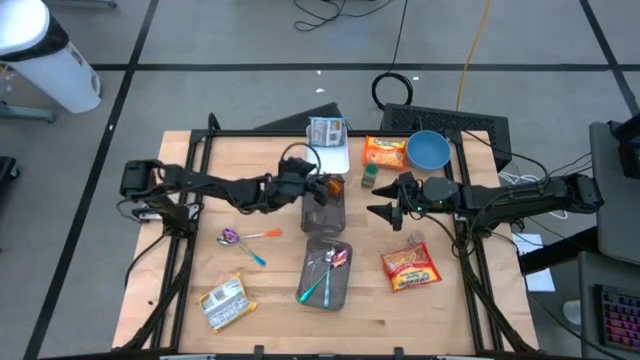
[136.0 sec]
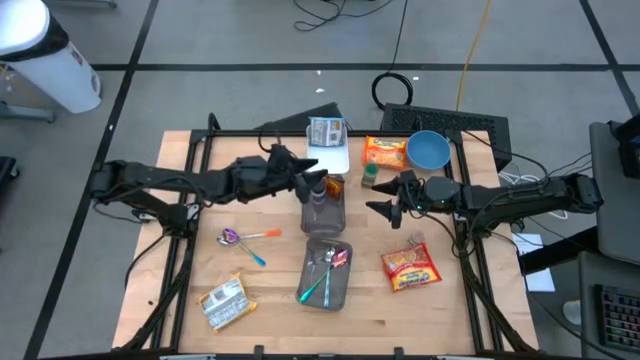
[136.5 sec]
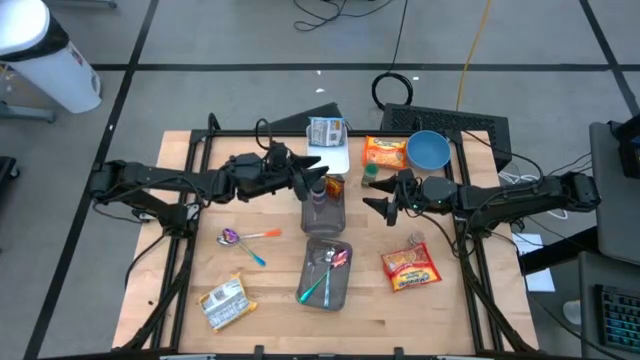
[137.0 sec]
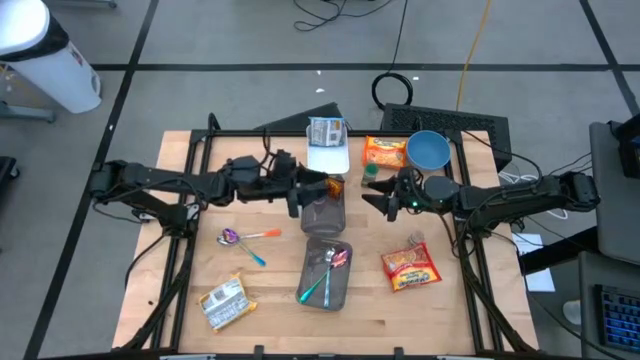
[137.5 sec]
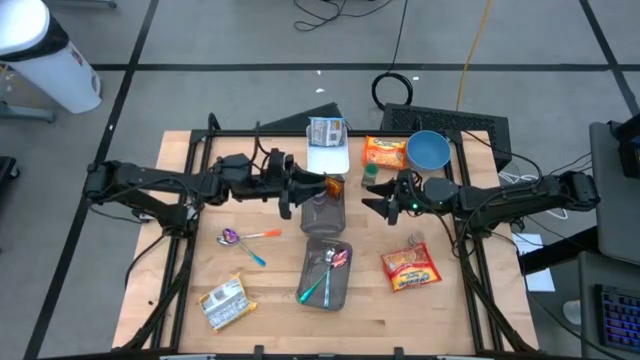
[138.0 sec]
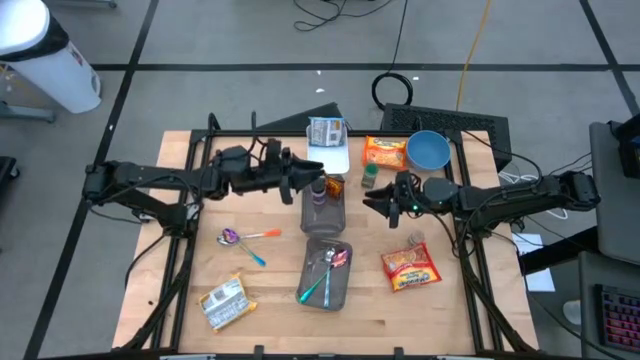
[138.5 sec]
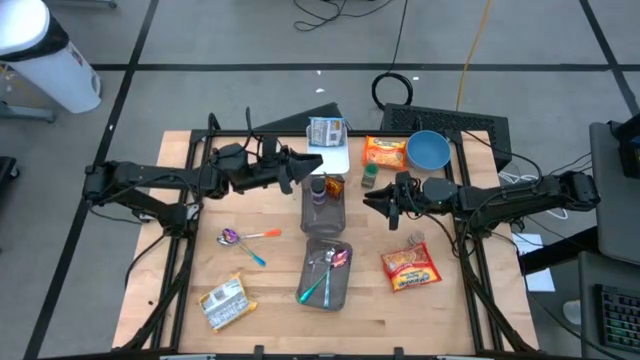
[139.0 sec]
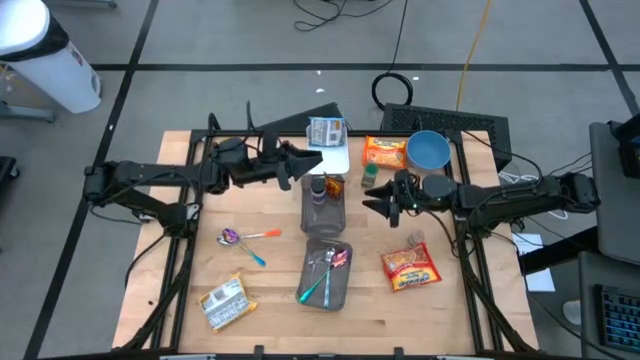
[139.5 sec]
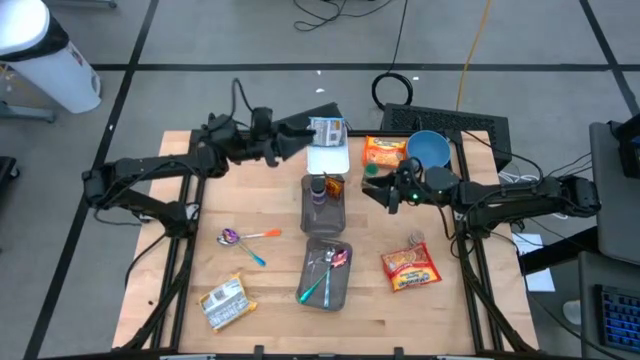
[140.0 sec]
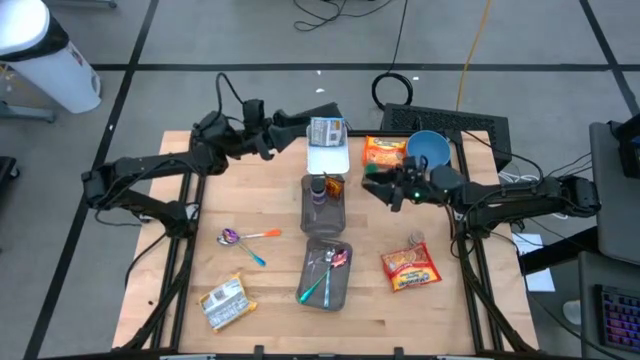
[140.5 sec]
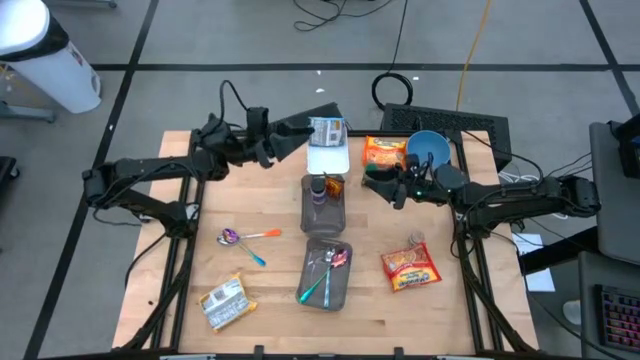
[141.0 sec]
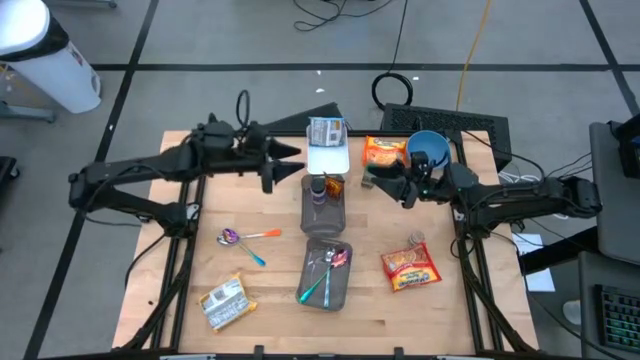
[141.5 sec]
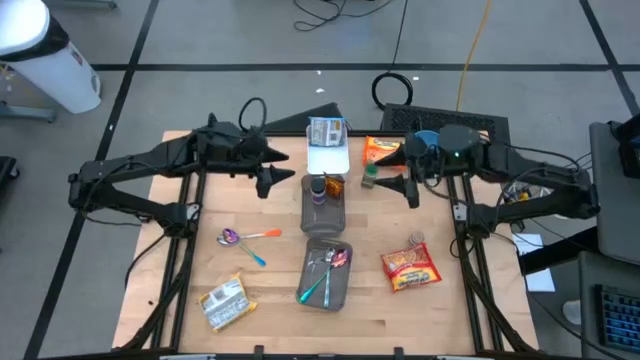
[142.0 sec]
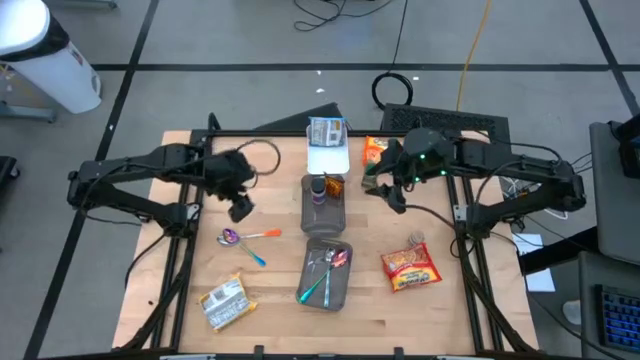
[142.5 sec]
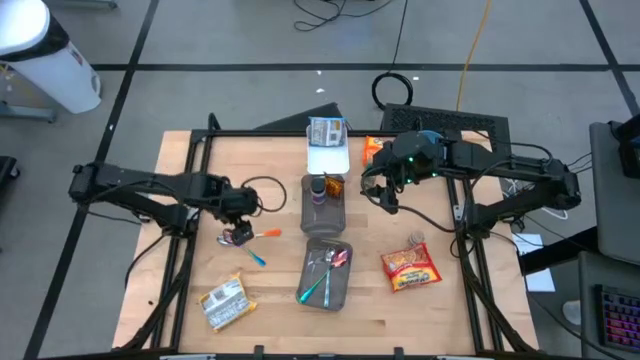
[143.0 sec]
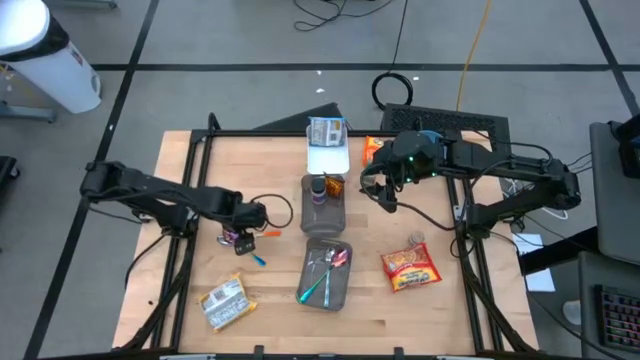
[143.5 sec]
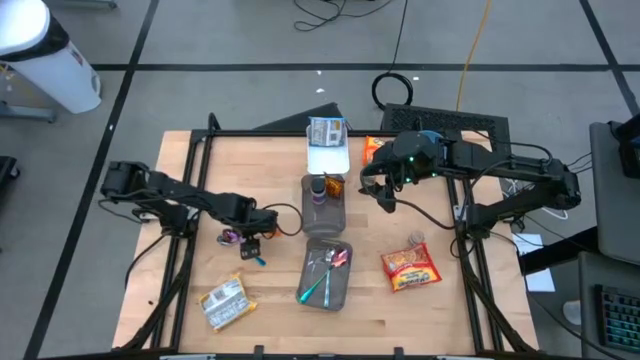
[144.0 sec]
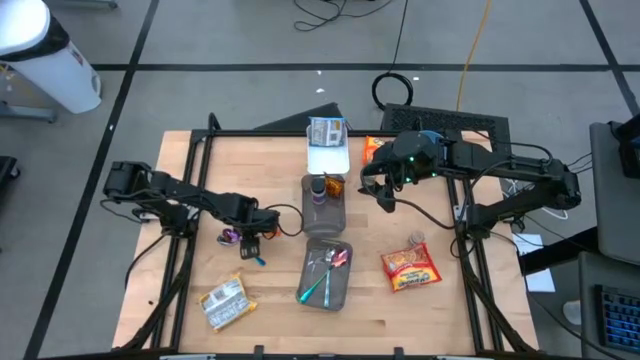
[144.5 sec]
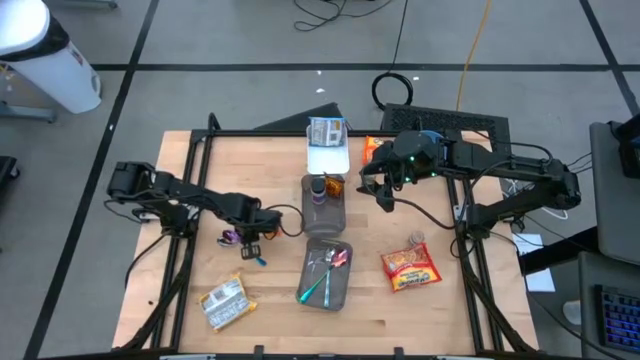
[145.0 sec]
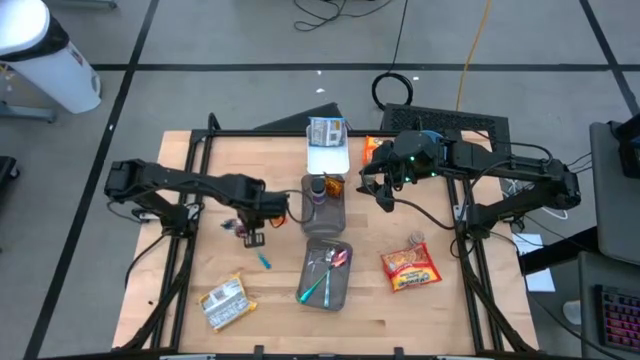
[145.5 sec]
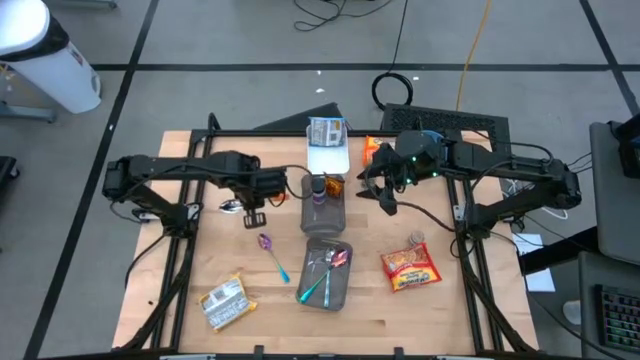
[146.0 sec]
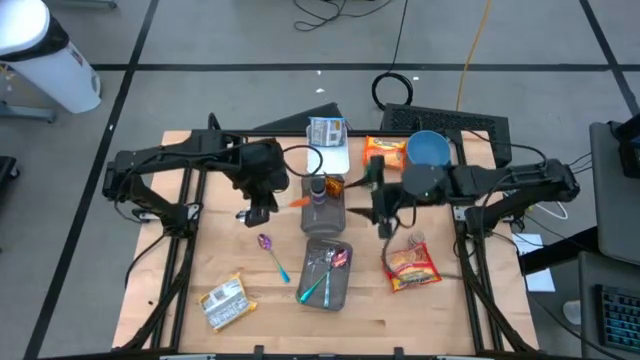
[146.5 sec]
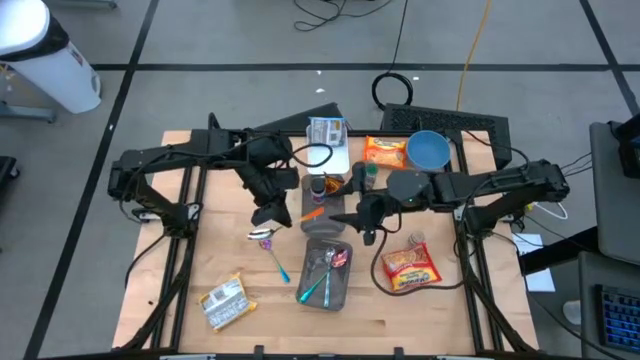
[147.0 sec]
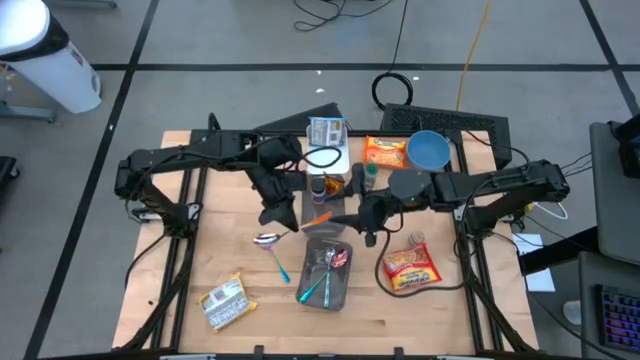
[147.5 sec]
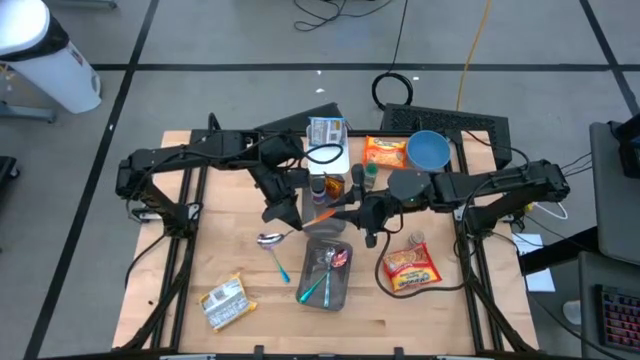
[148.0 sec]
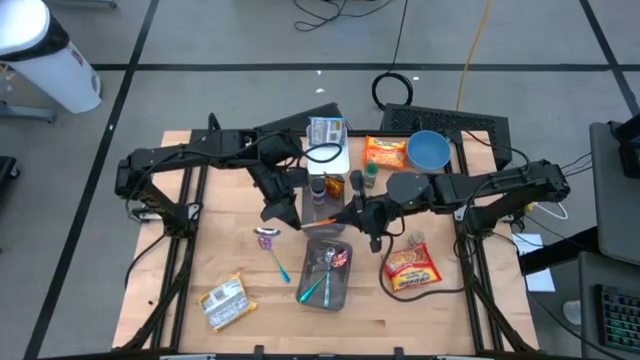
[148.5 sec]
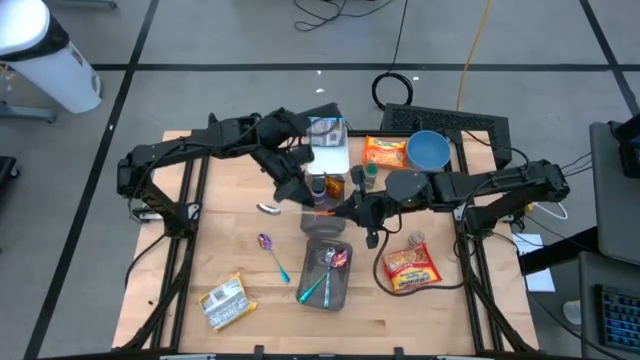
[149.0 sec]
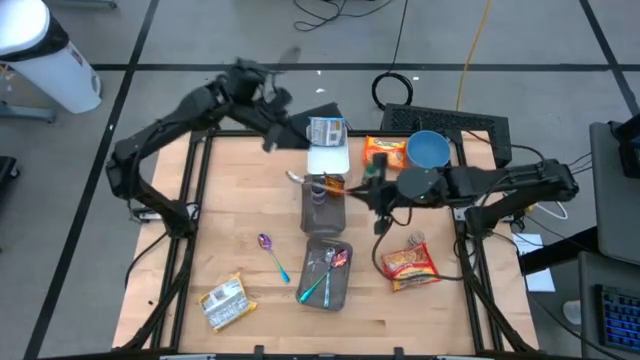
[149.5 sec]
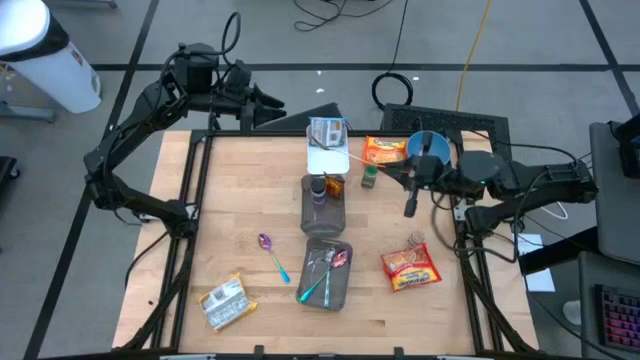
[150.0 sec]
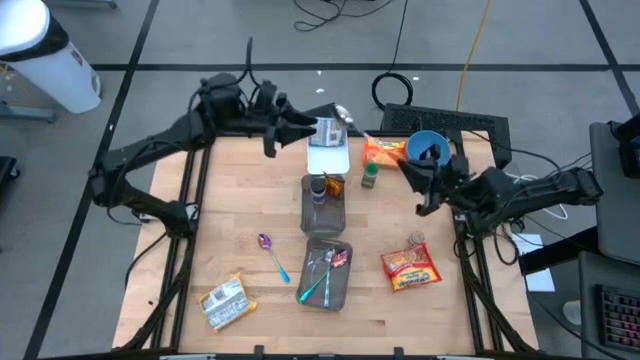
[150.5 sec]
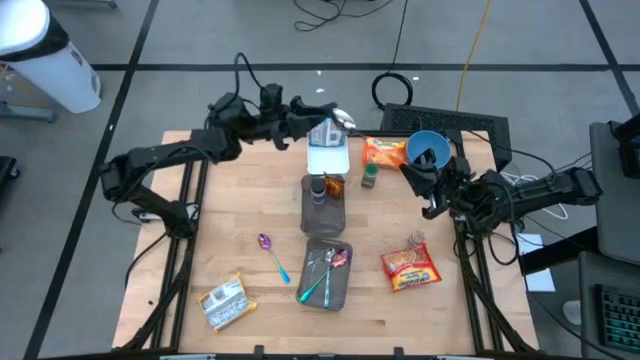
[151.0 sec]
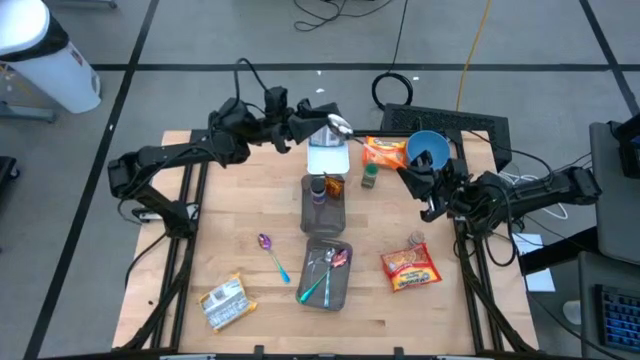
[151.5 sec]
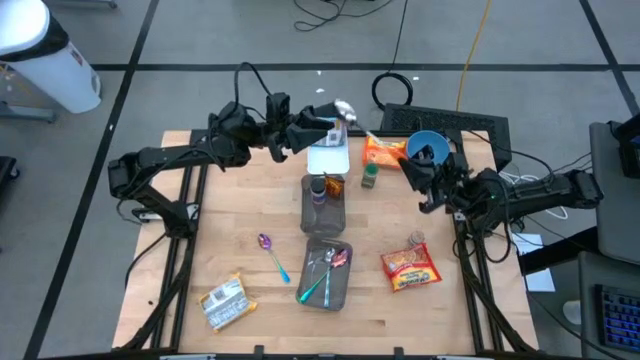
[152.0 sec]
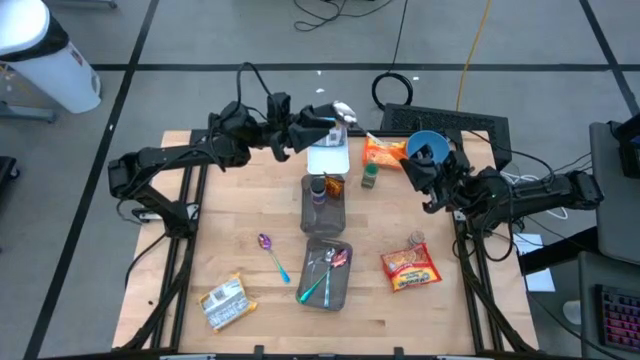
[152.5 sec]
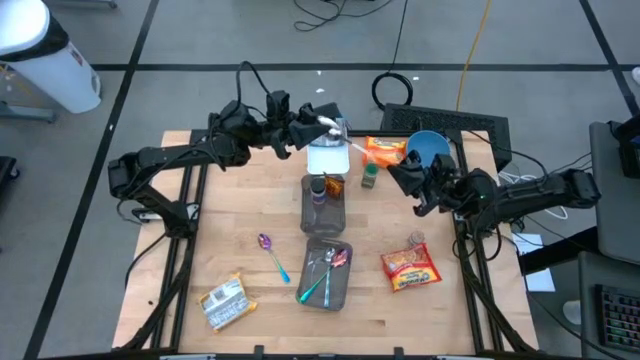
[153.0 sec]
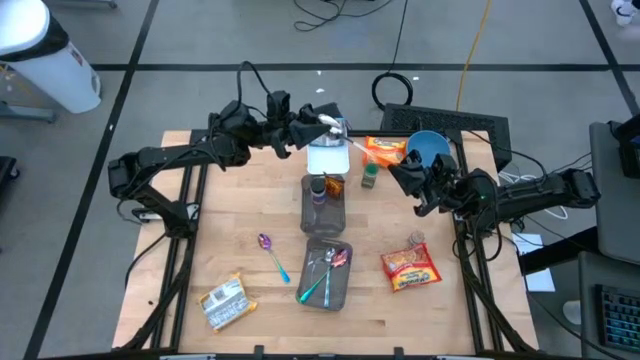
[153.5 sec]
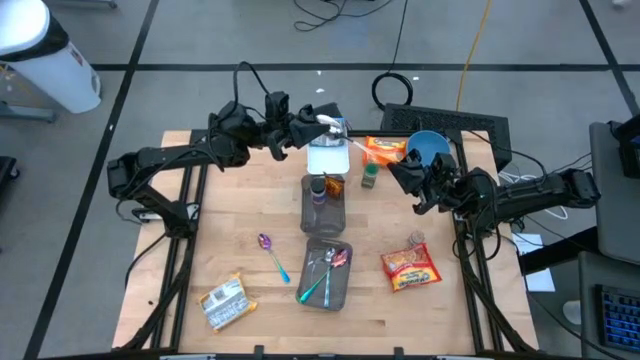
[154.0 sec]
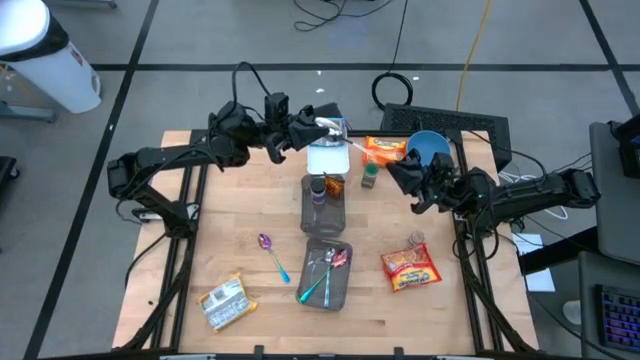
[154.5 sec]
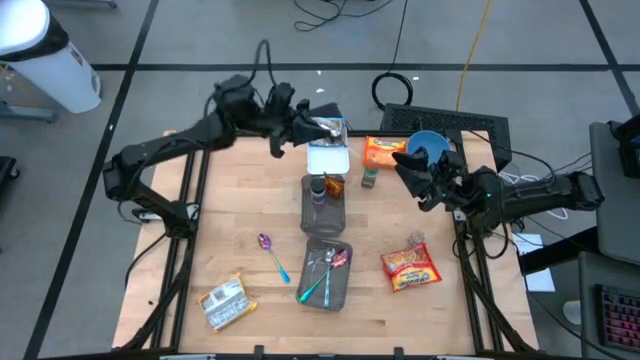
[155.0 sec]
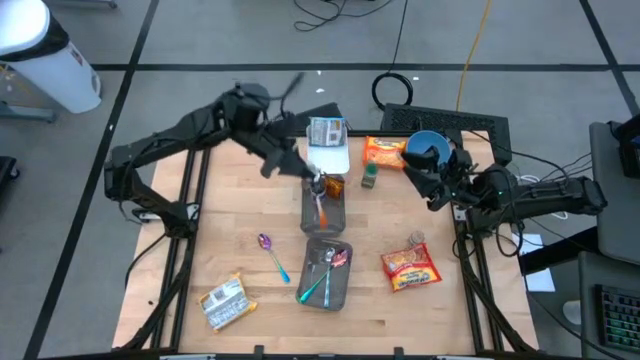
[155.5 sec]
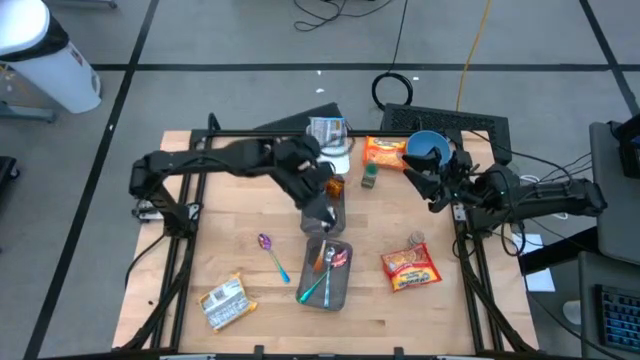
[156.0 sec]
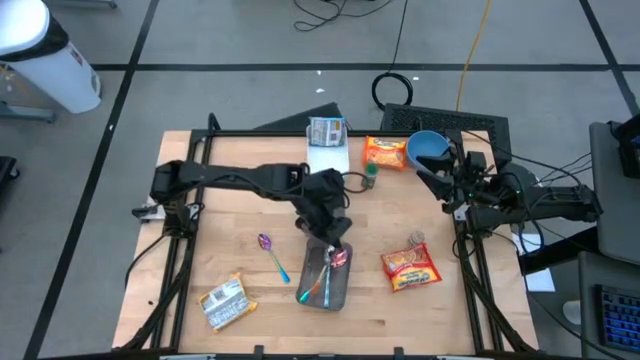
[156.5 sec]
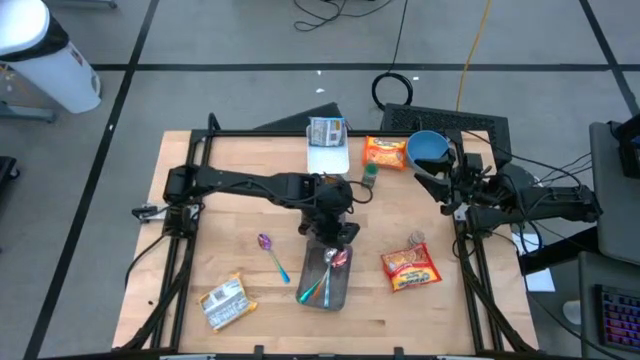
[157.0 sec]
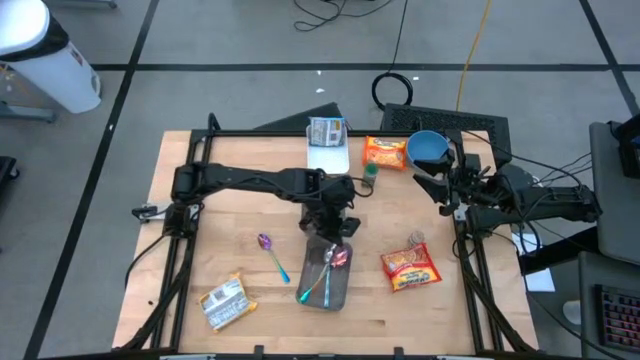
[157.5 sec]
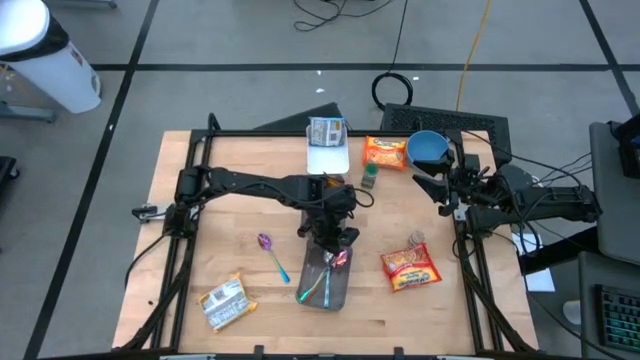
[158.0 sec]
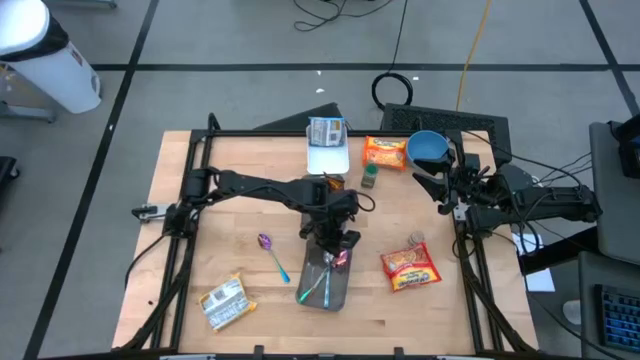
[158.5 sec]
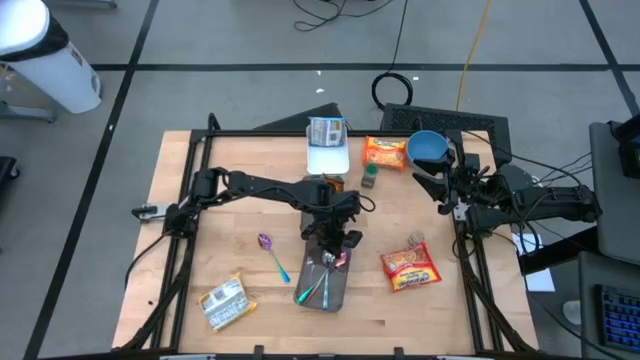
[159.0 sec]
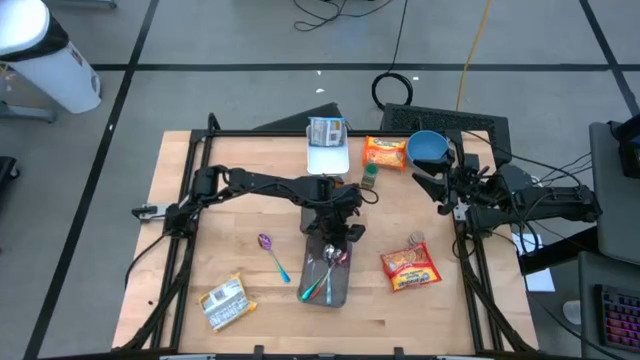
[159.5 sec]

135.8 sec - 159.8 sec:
Task: Pick & Place Food Item
Put the orange spoon into the bottom black bin
